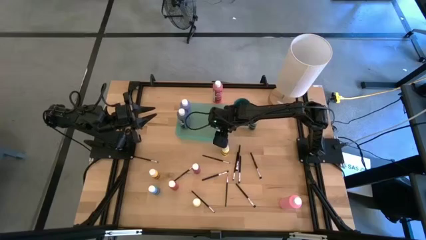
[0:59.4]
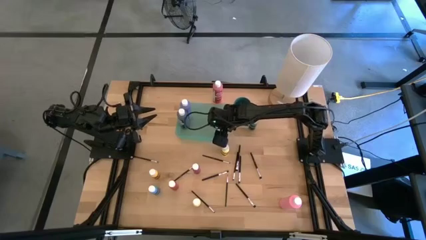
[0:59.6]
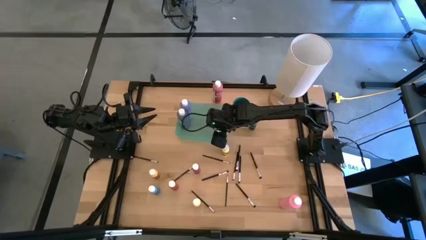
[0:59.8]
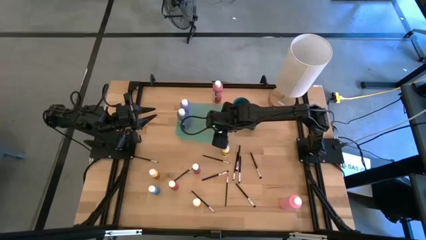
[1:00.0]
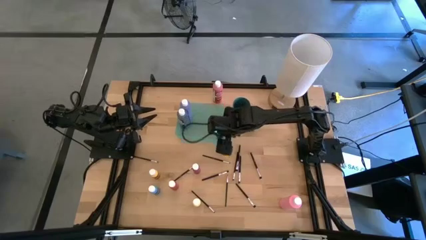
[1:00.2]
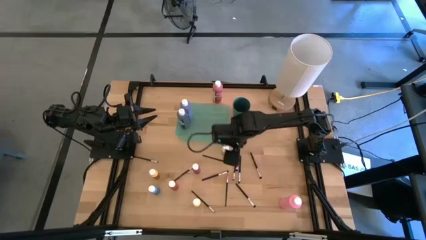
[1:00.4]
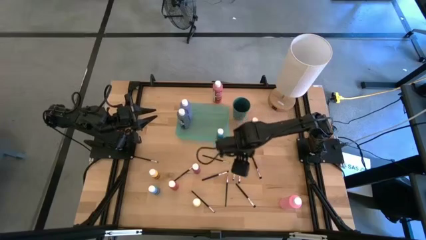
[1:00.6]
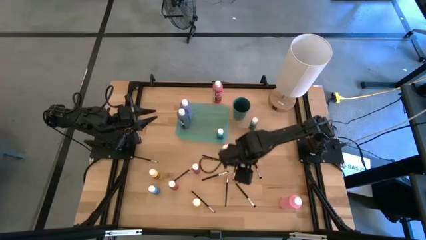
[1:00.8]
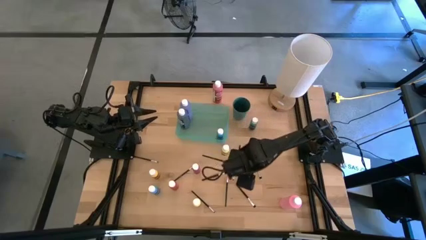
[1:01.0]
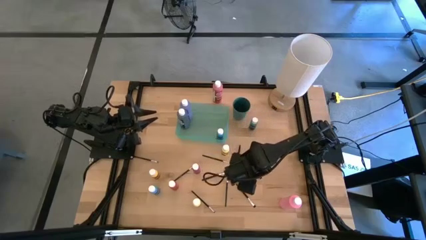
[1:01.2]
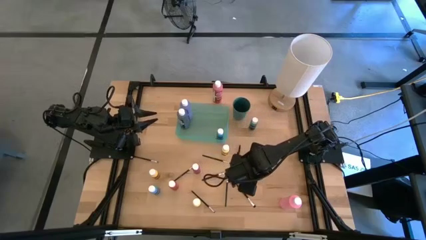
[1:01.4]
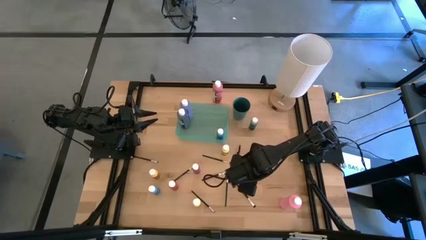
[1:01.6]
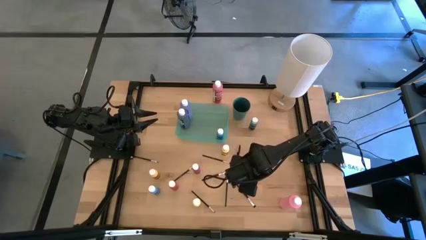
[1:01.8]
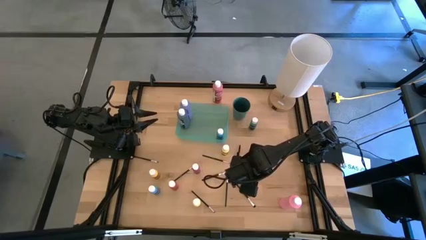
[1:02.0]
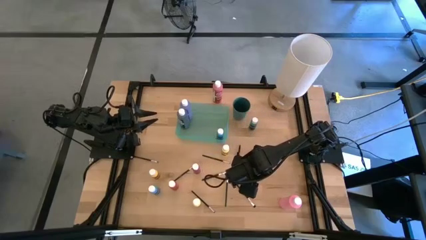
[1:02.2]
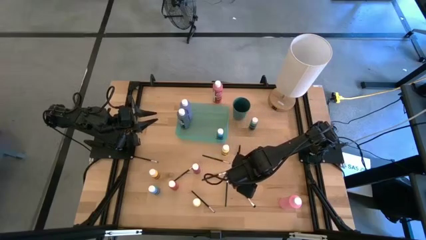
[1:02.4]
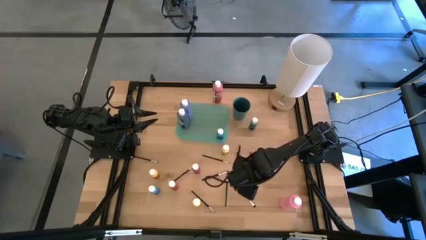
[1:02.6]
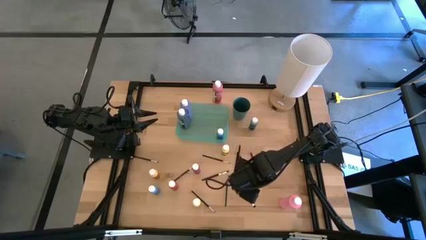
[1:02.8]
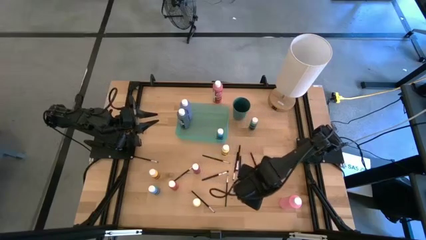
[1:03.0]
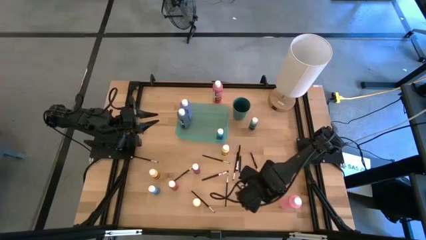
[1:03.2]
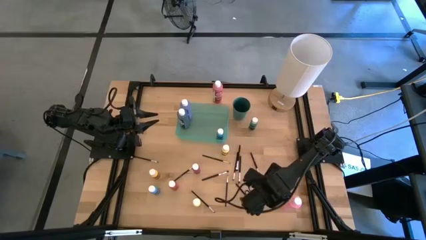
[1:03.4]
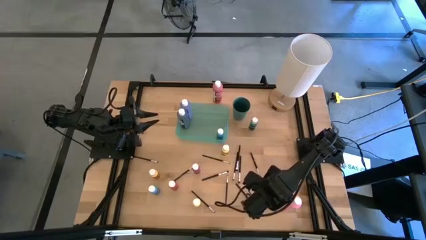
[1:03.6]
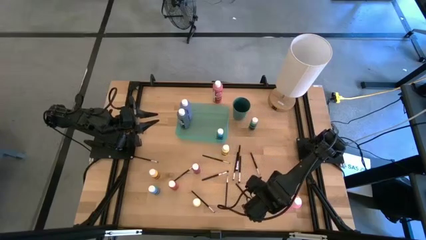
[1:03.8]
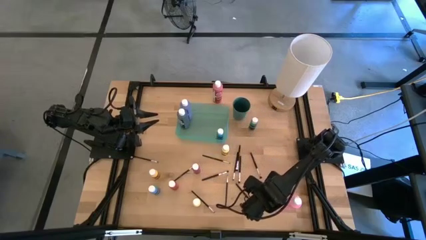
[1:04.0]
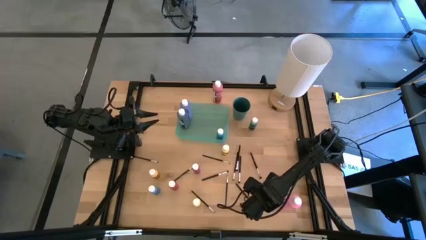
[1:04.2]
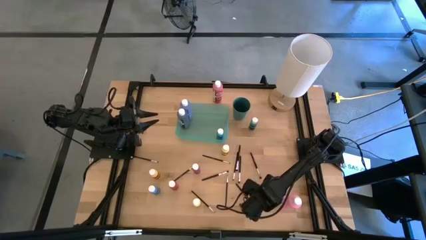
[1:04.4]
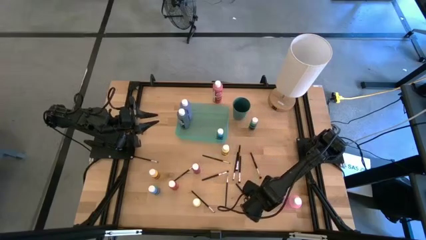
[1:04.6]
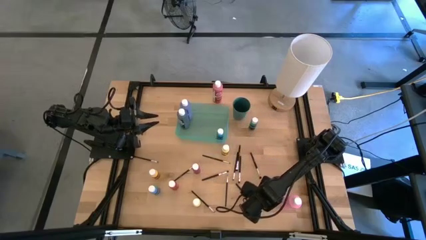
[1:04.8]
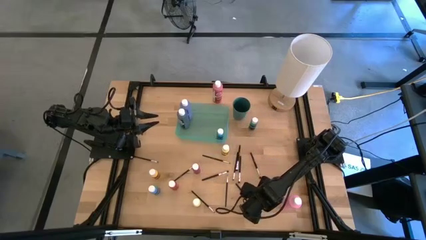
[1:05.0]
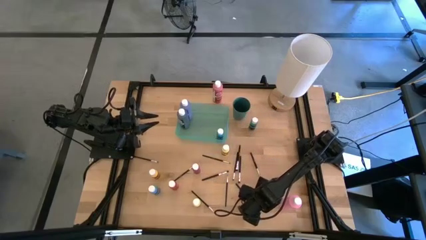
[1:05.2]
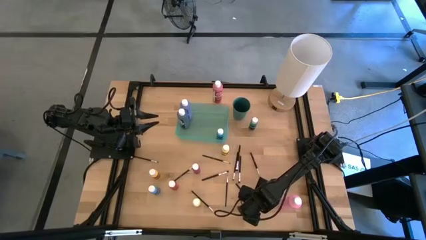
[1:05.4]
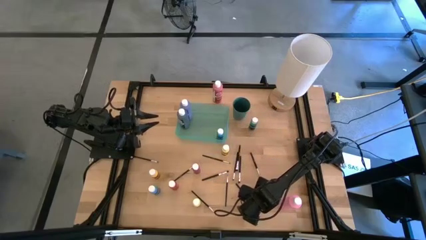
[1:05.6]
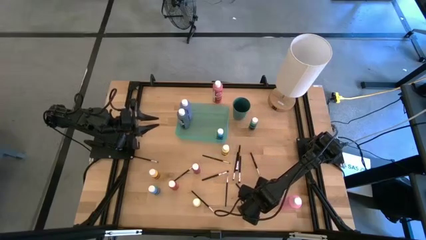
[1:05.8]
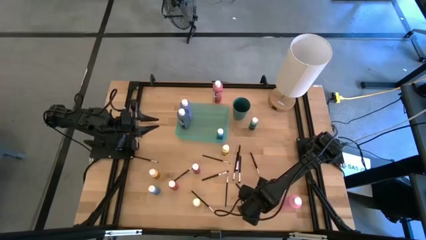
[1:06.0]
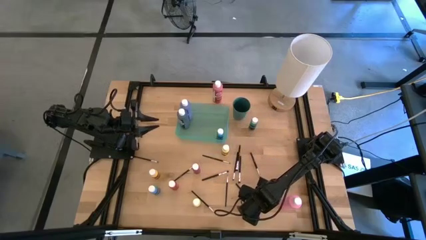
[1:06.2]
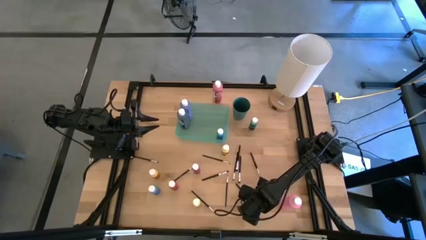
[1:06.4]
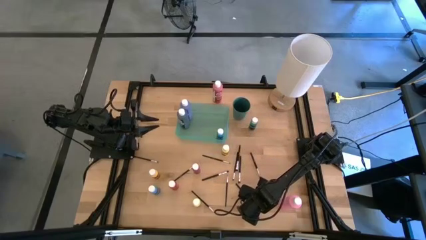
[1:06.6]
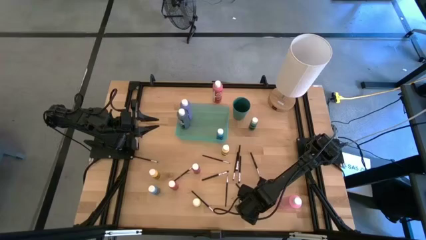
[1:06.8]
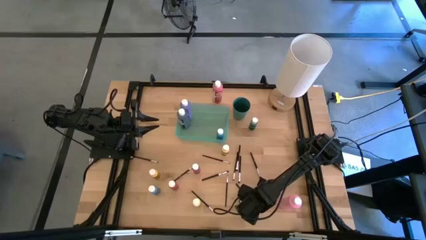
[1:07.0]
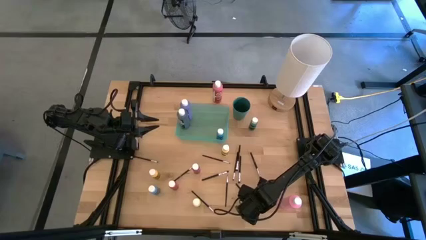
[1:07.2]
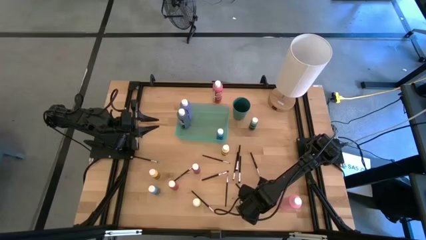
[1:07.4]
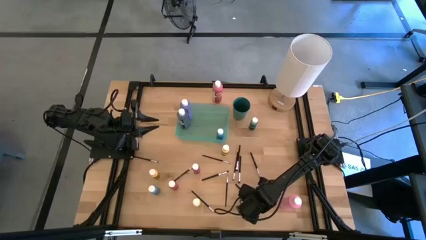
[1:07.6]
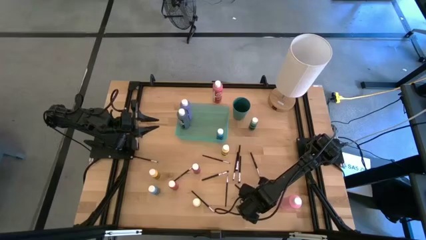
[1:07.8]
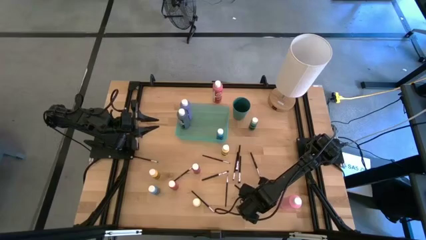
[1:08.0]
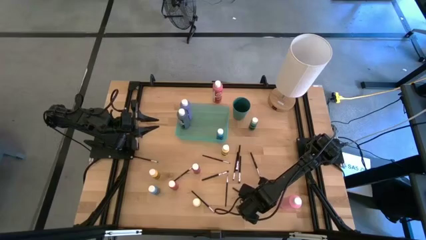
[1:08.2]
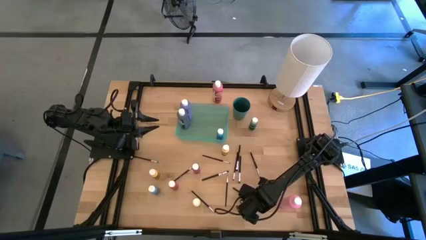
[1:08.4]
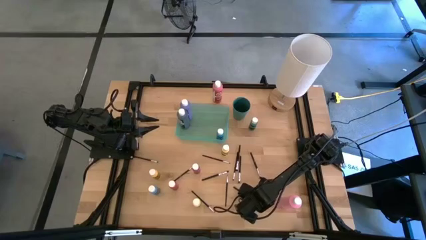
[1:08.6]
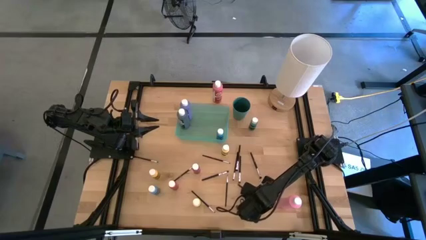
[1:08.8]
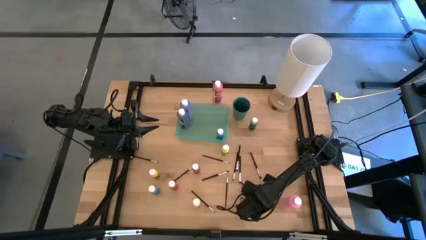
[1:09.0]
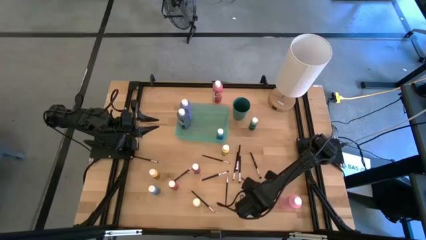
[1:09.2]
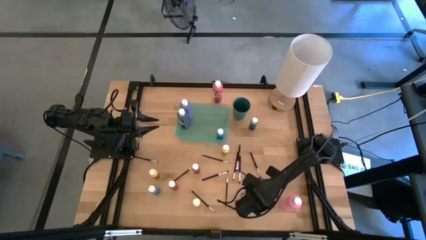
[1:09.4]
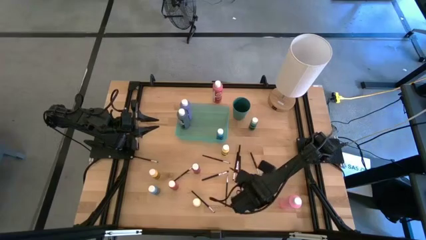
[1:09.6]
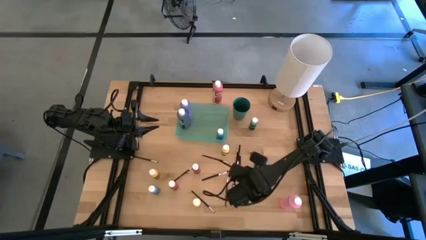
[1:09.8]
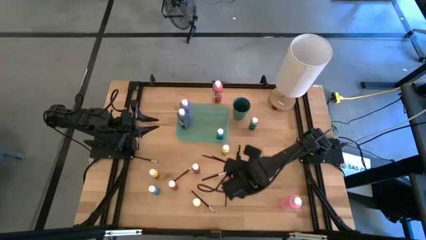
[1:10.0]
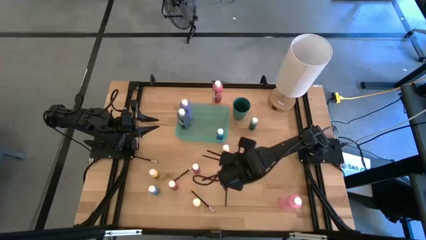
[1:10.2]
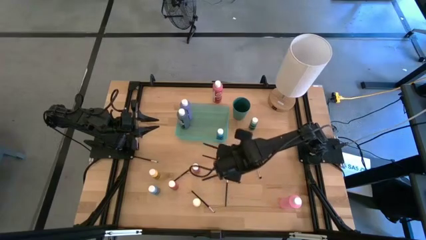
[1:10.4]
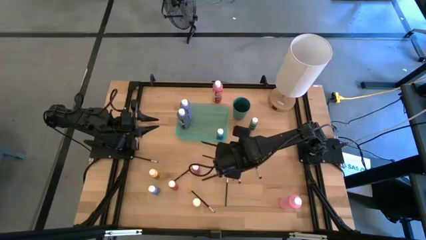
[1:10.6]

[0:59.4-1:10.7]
Task: Pick & Place Paint Supplies
Put the black paint brush into the dark green cup
